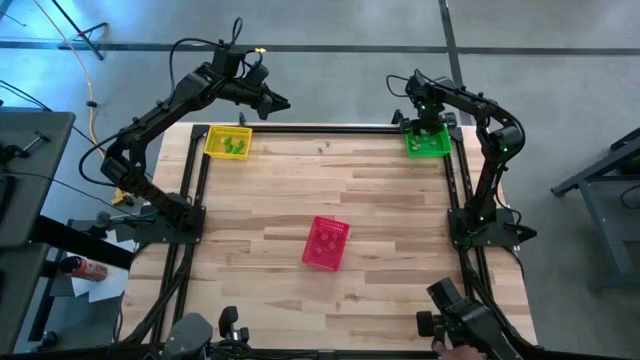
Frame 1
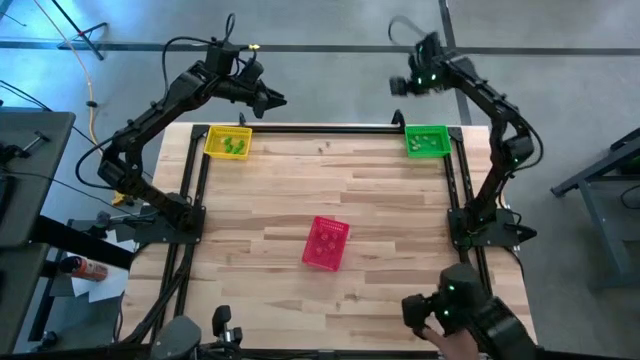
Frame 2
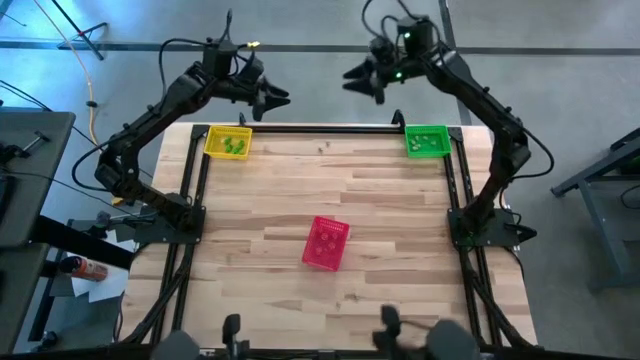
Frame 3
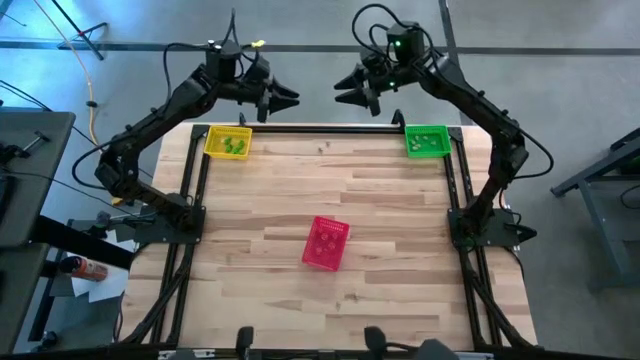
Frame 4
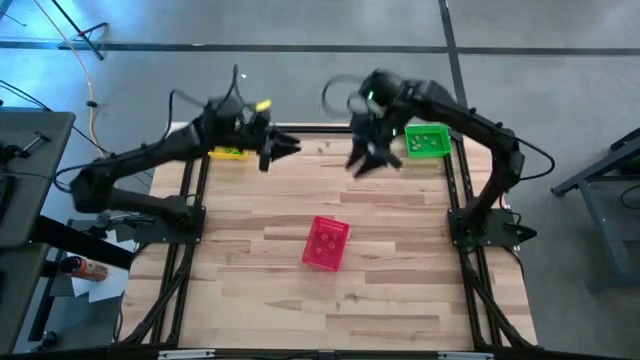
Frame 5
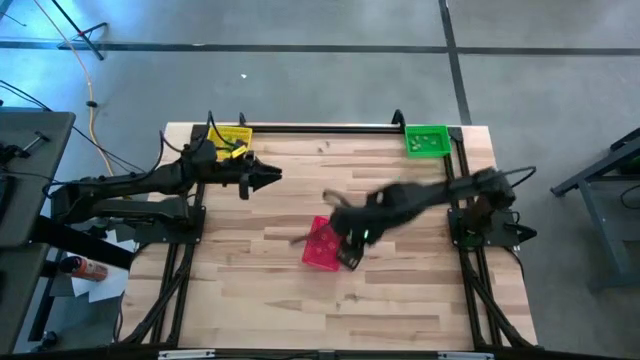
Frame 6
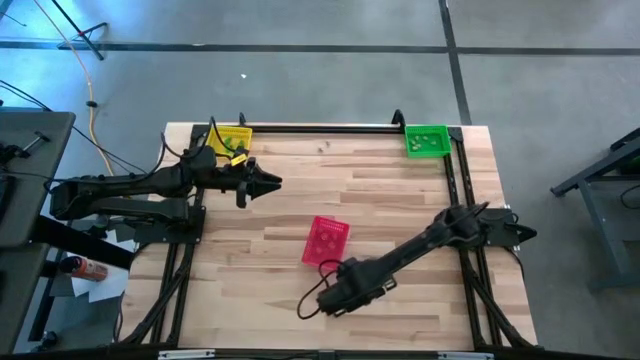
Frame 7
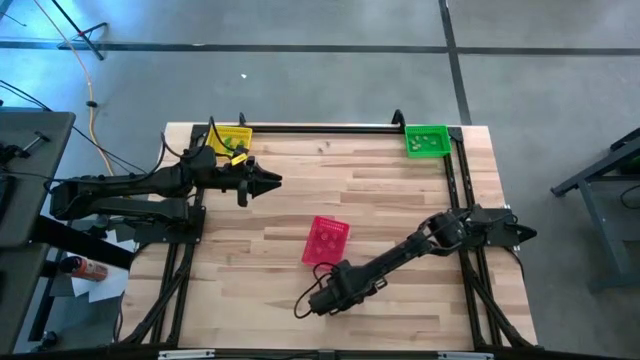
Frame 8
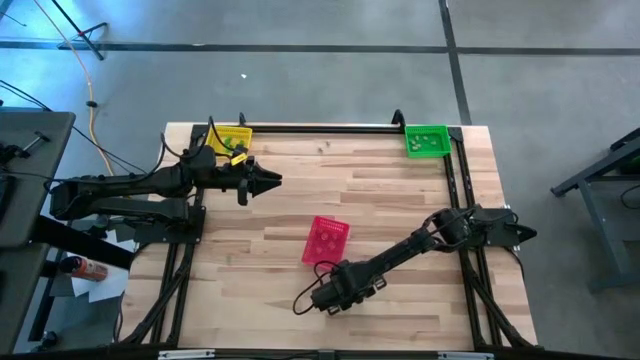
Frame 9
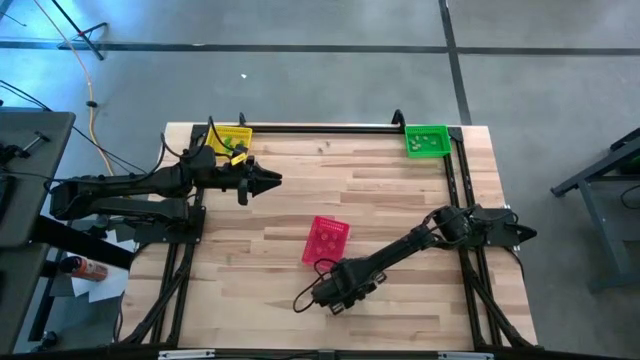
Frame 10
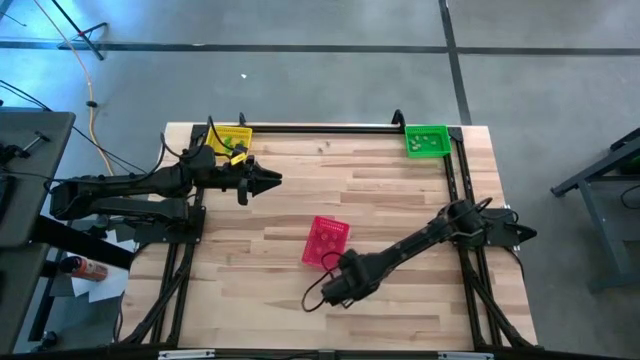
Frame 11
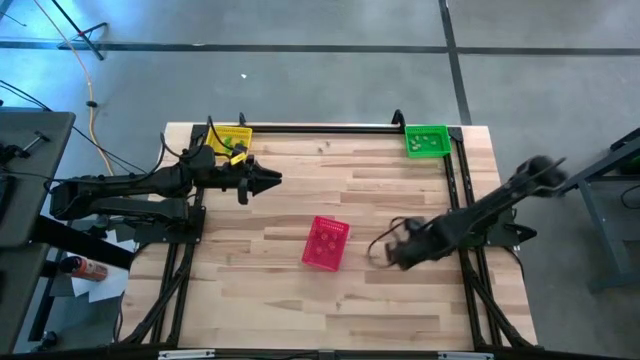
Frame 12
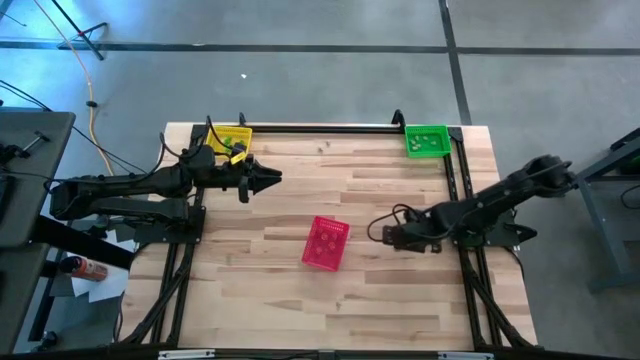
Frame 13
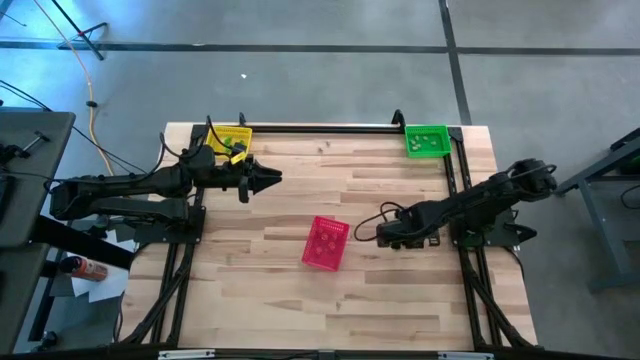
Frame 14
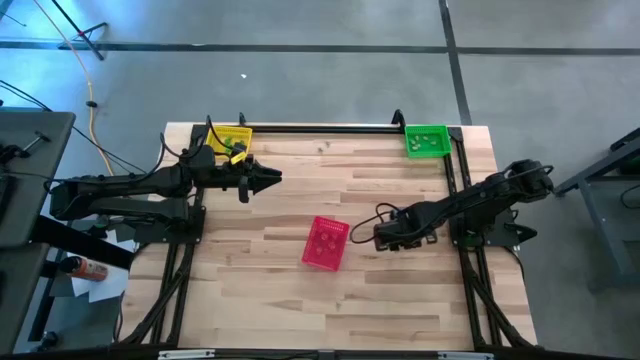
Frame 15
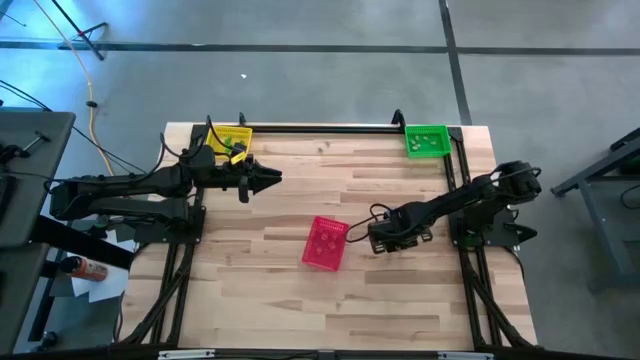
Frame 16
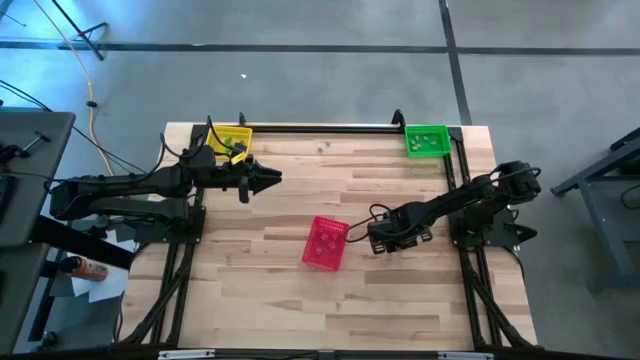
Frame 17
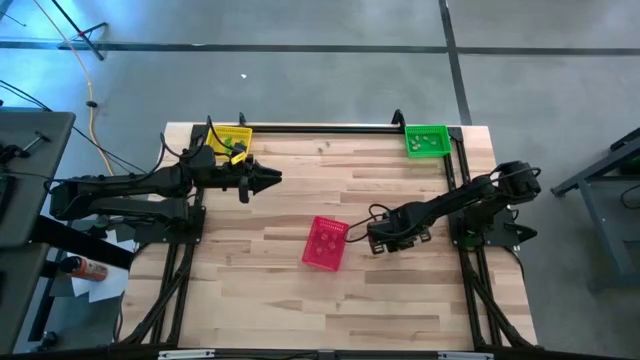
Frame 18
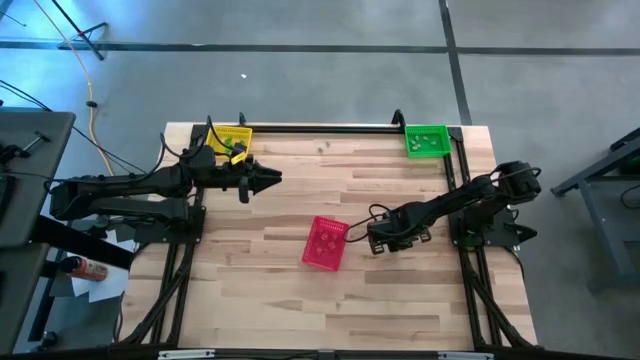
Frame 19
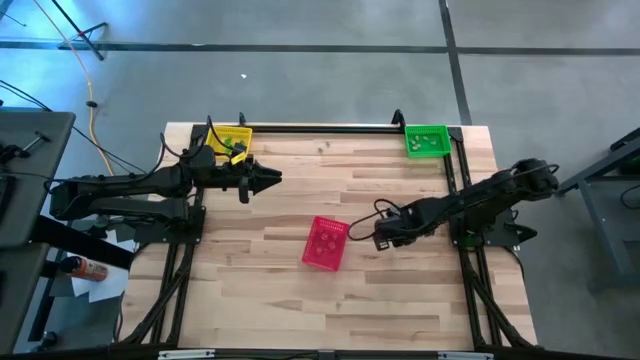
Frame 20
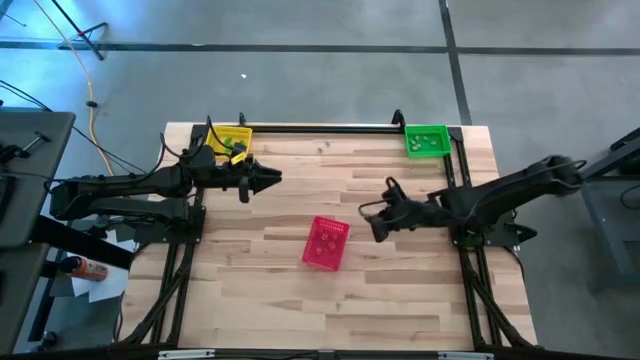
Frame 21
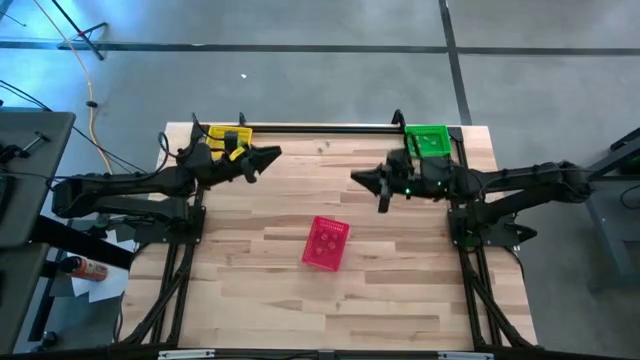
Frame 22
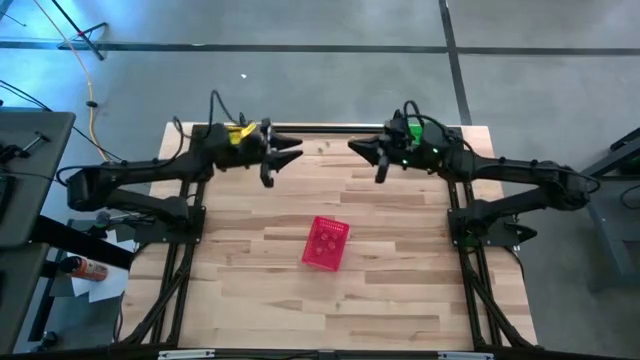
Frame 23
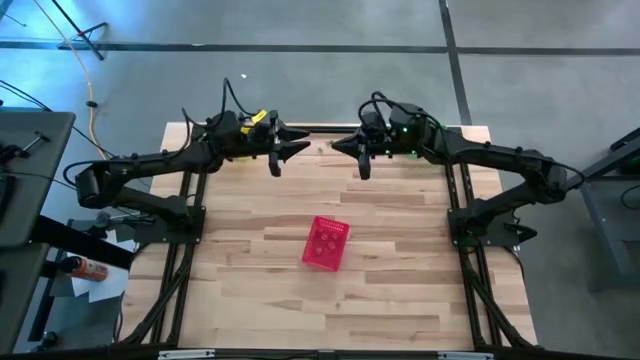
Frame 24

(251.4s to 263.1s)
Task: Sort Halloween decoration
Put the white skull toy into the green bin

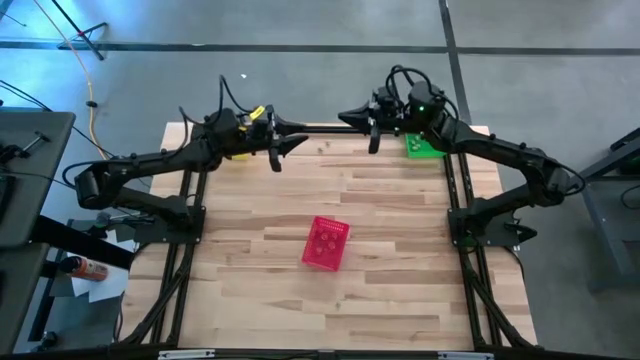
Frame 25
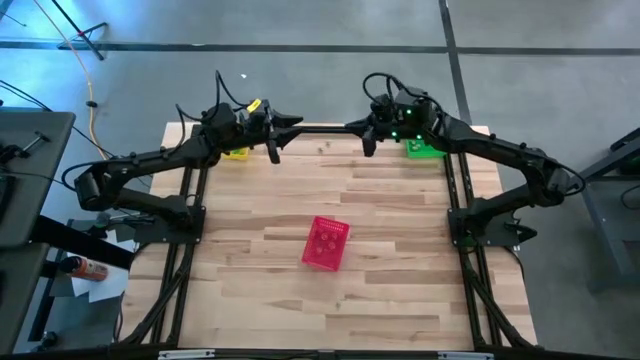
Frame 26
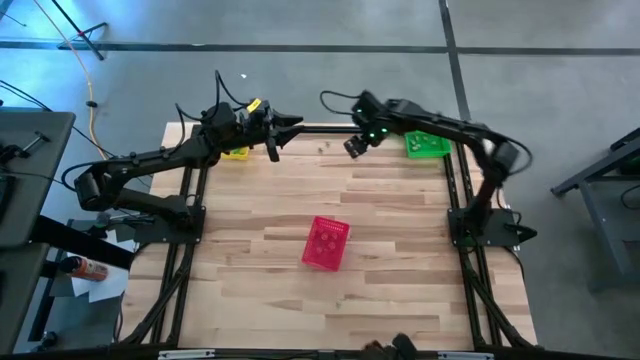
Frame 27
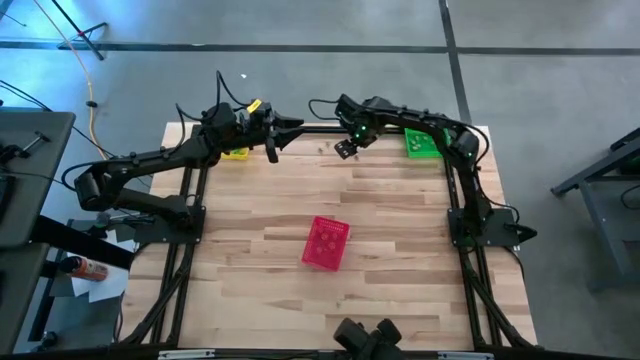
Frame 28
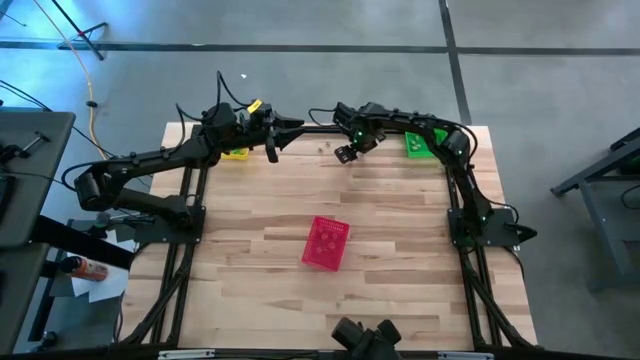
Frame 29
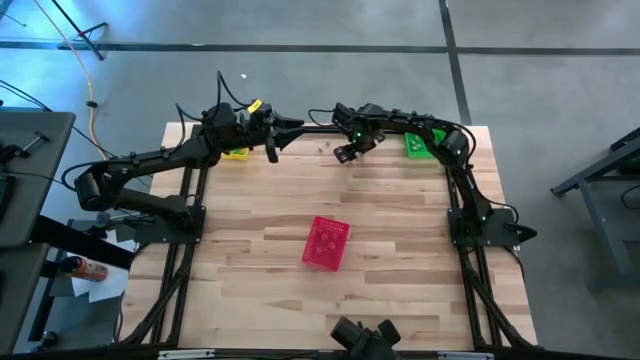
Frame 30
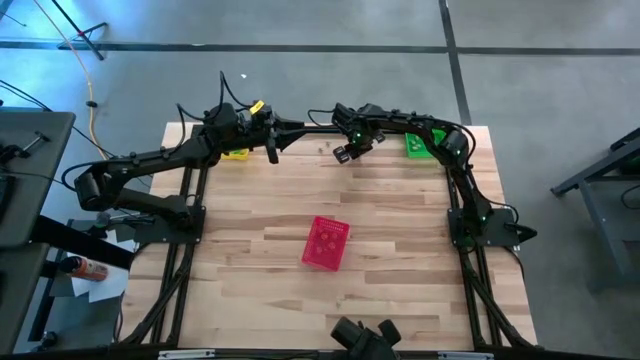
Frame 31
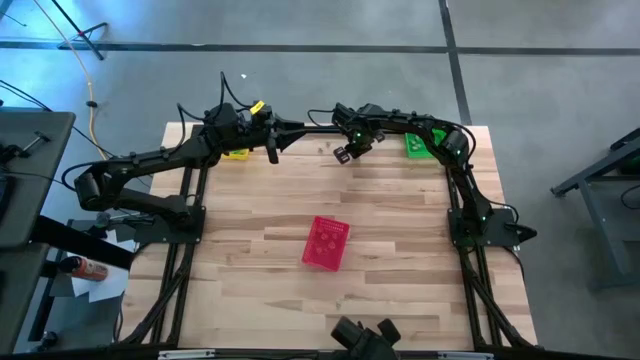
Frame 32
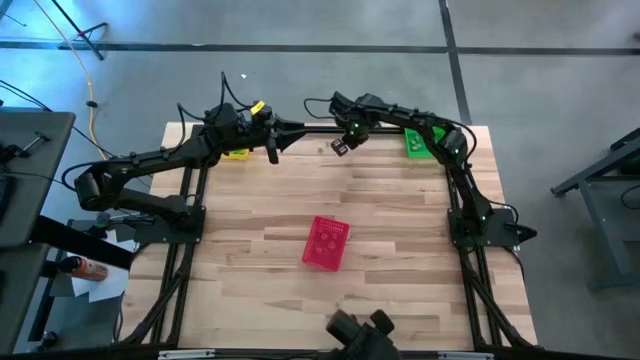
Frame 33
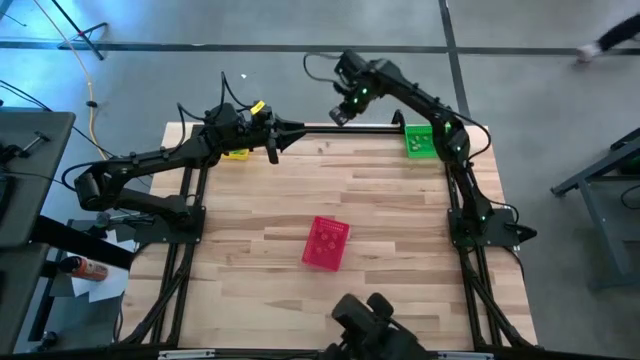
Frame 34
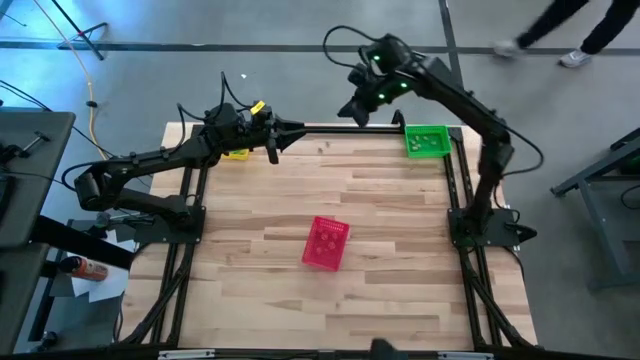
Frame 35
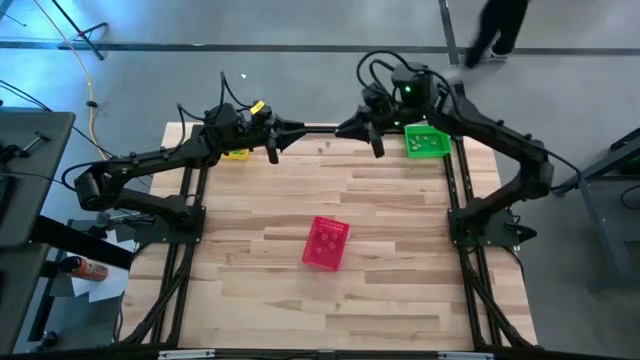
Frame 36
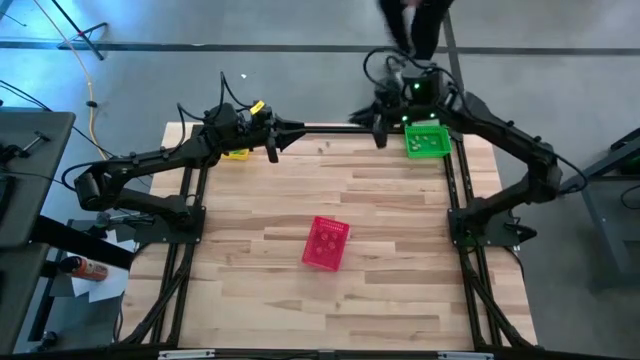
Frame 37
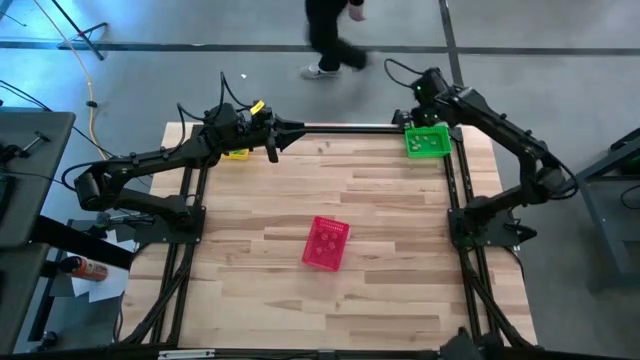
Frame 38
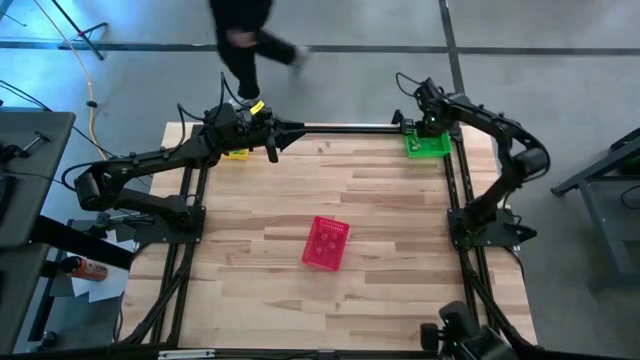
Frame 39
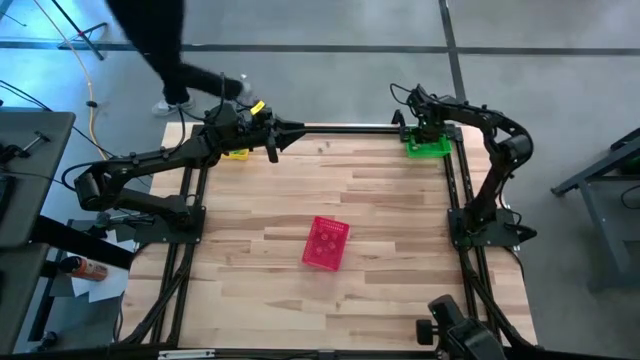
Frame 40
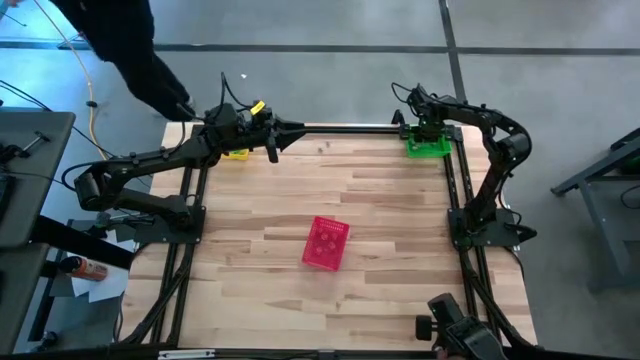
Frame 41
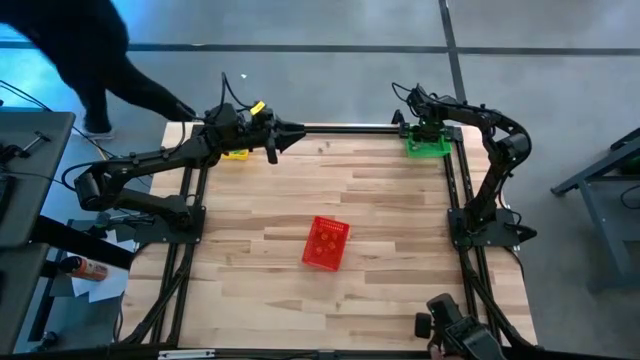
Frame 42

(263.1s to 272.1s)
Put the white skull toy into the green bin
